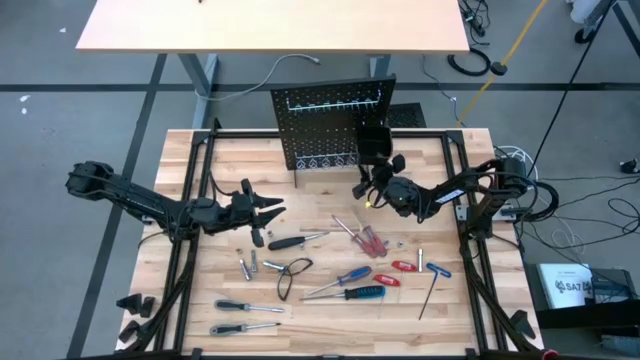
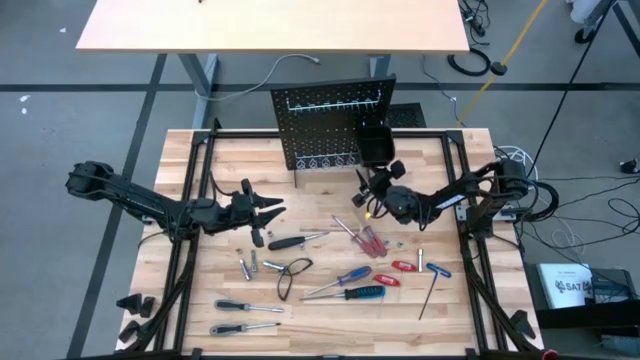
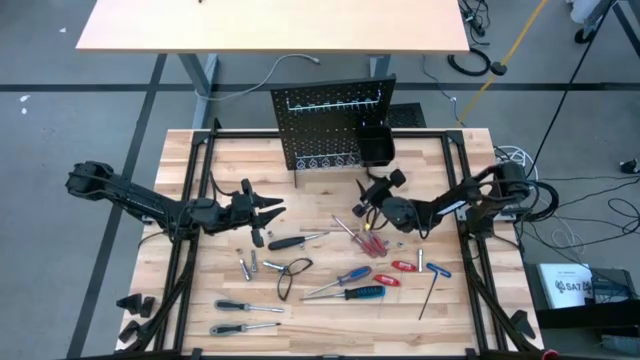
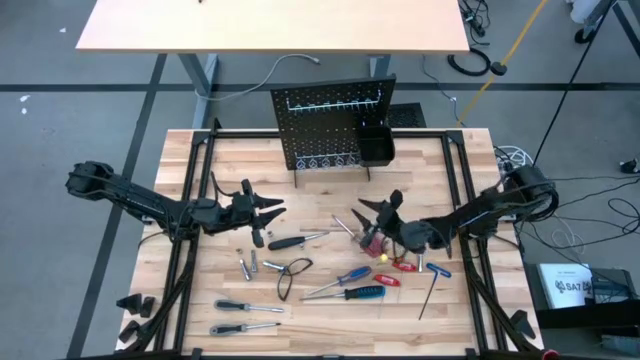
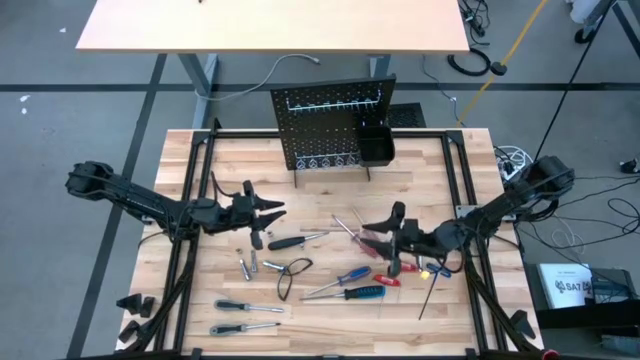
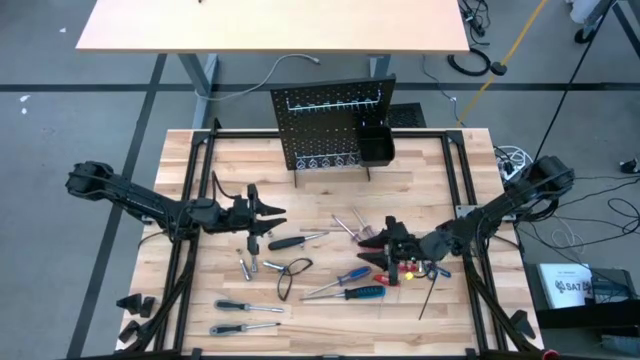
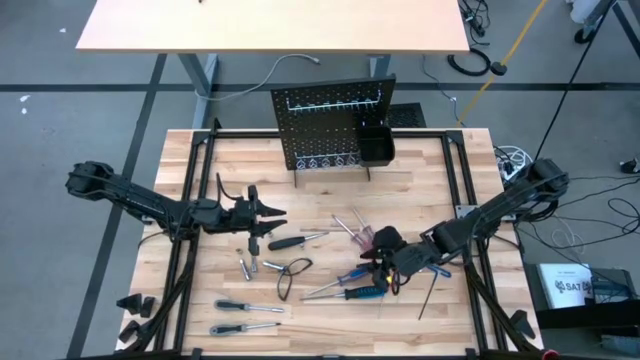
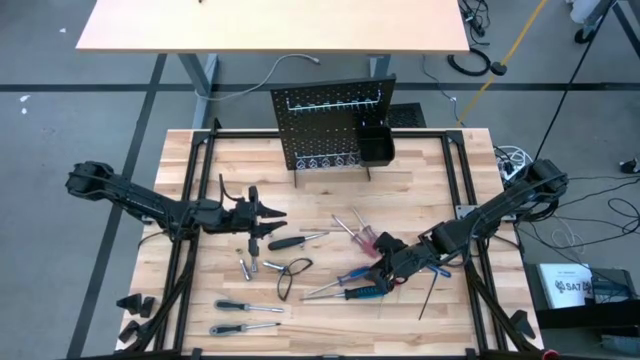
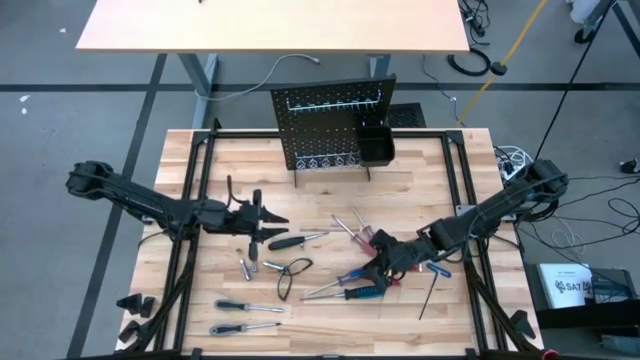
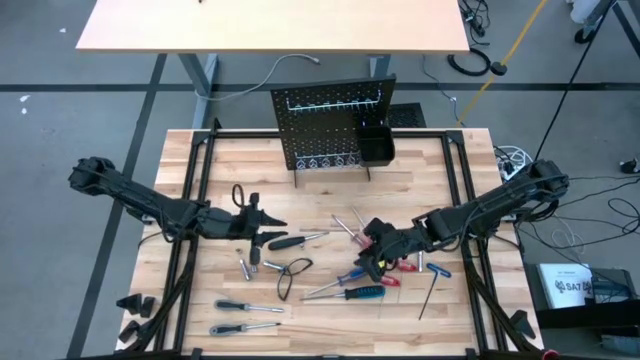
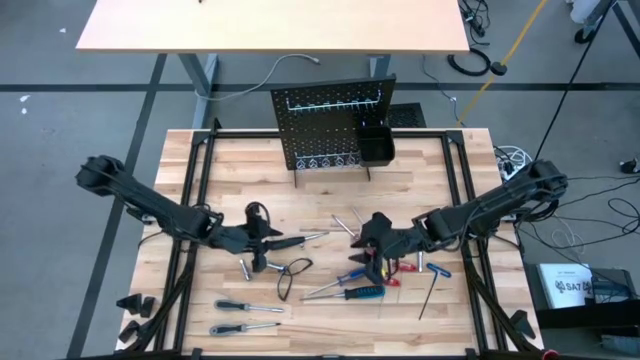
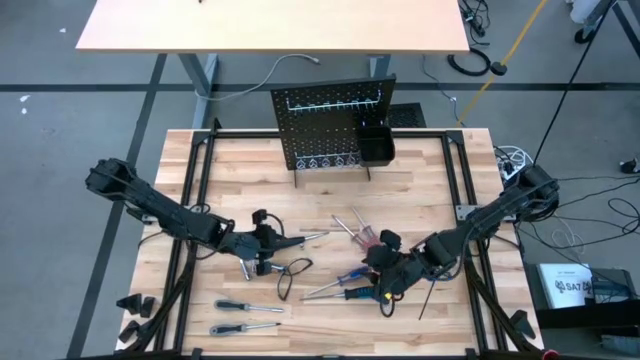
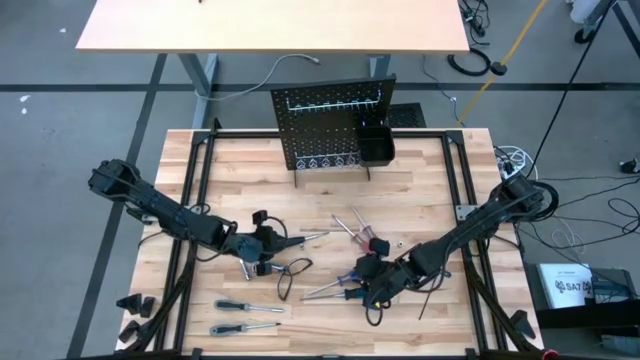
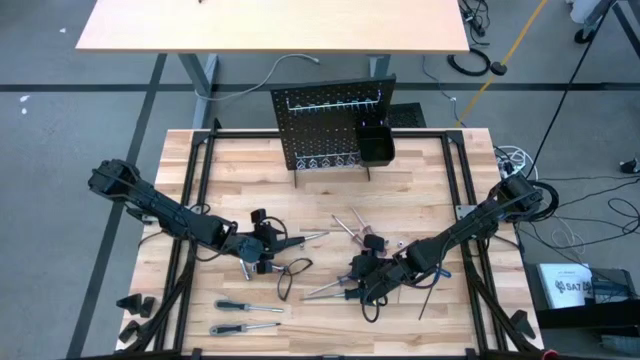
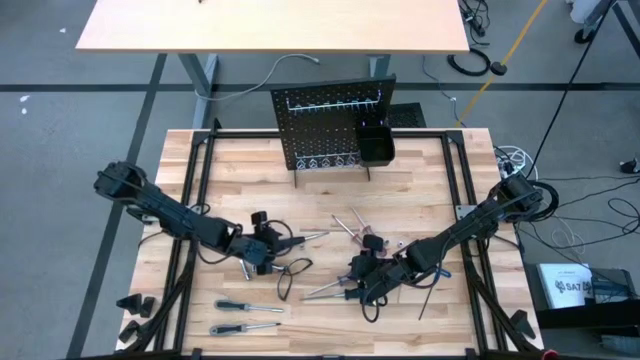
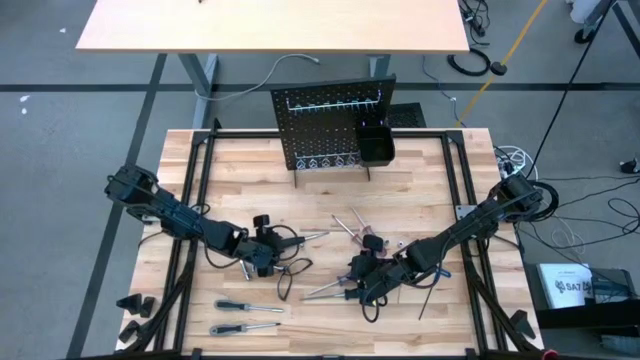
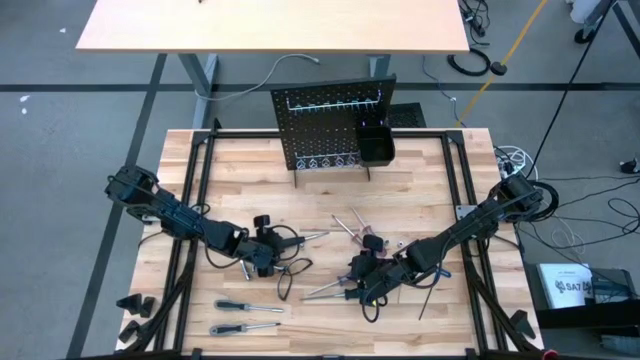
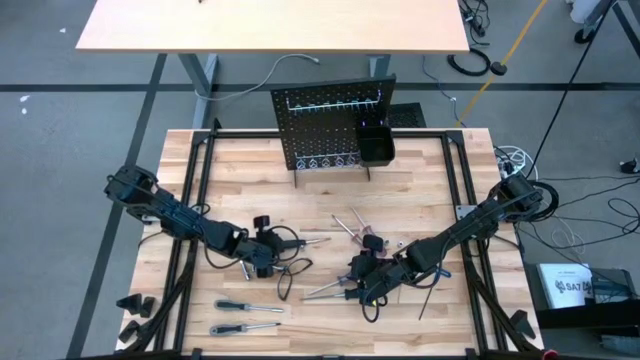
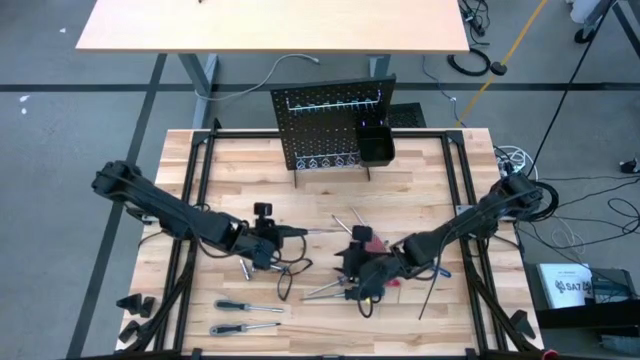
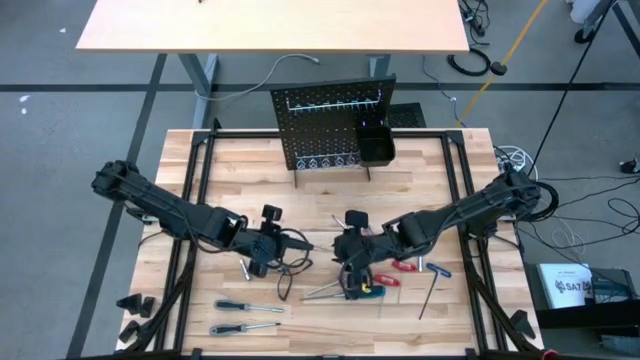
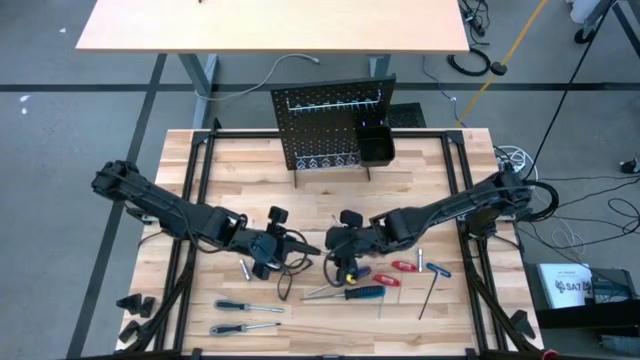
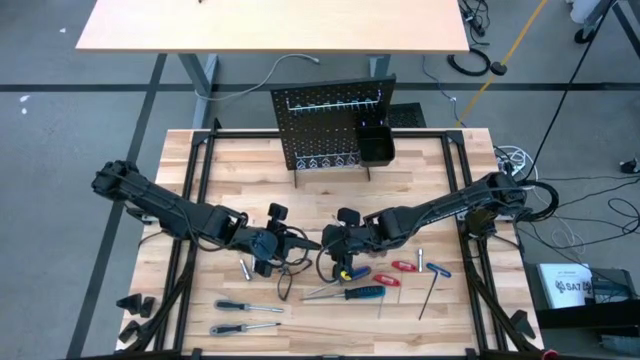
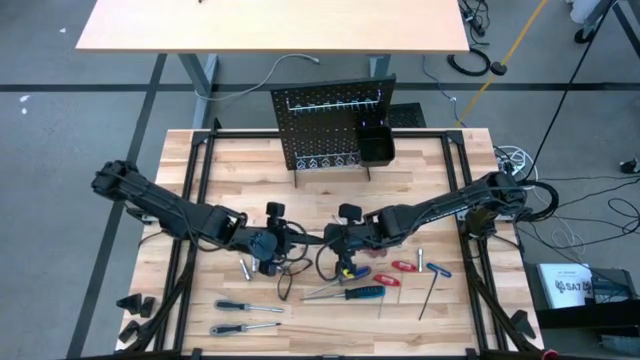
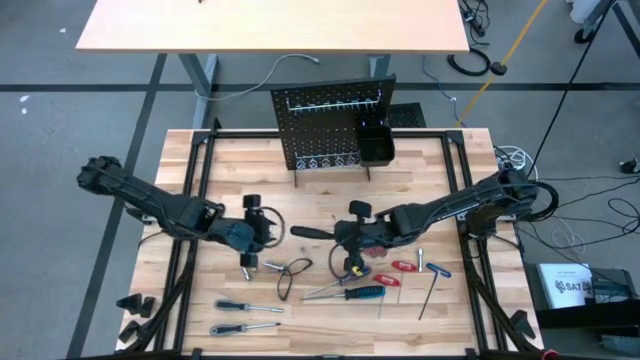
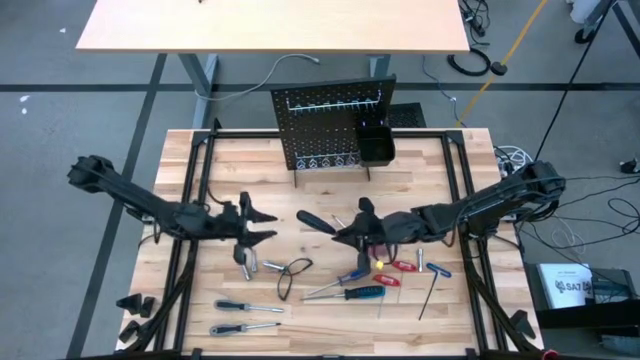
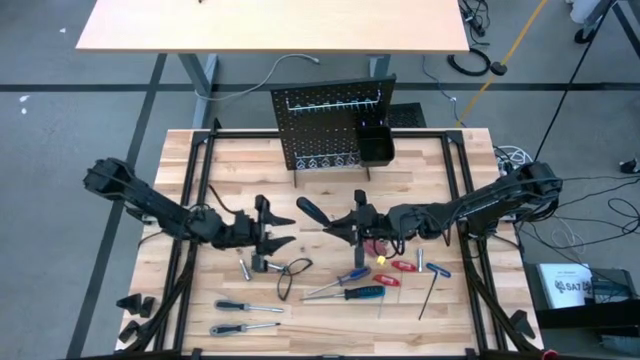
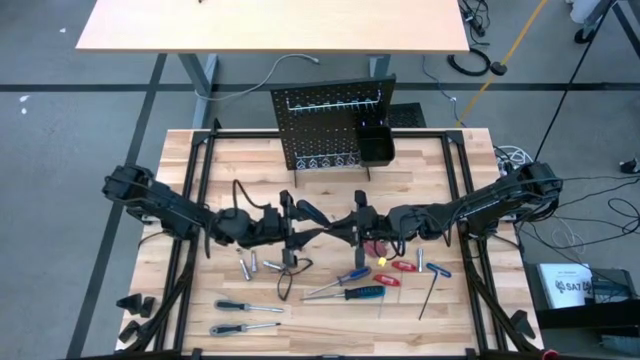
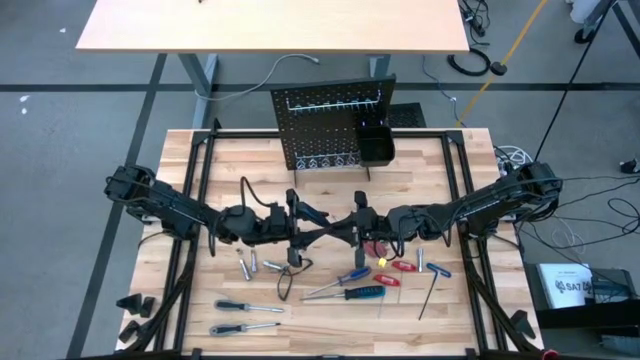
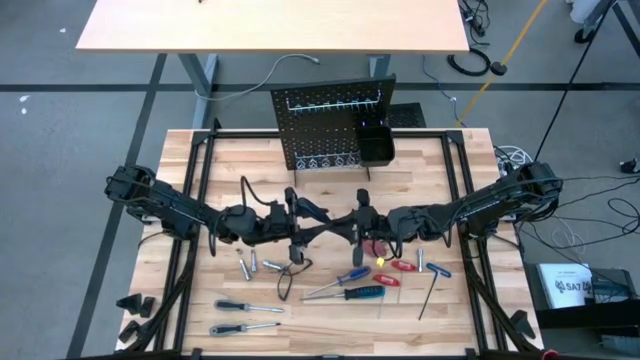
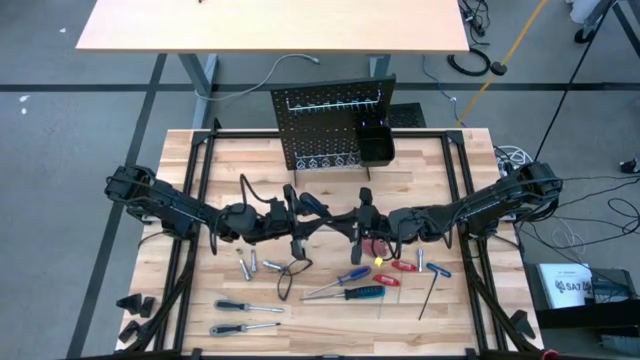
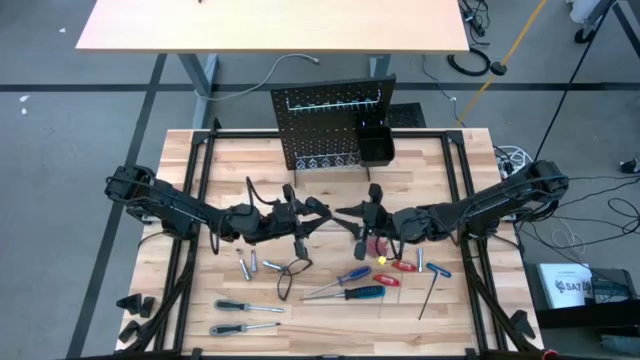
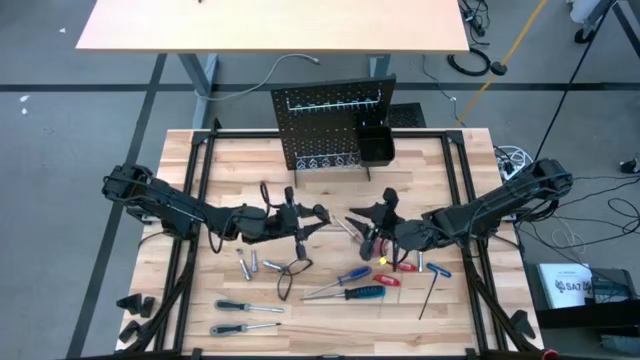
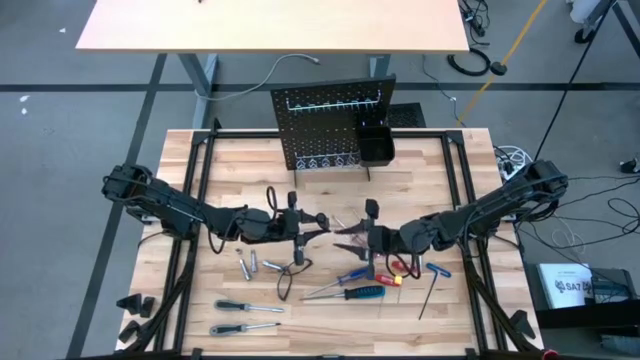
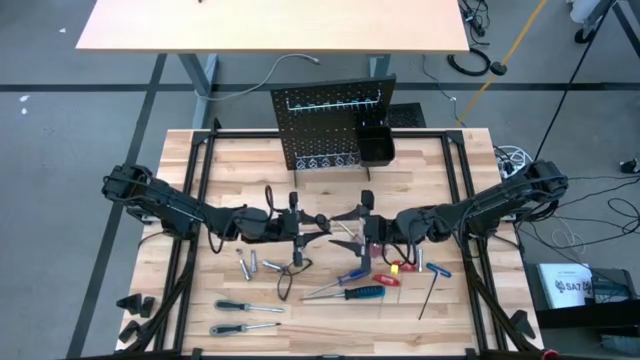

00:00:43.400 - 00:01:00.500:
Task: Hang tools onto peg board
Hang the black screwdriver on the peg board

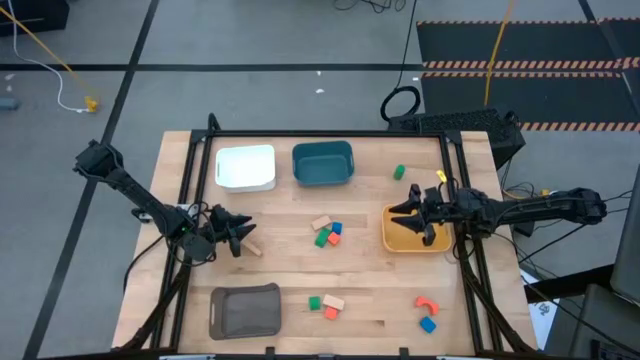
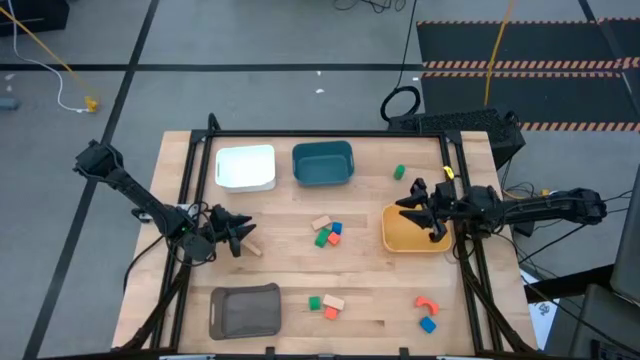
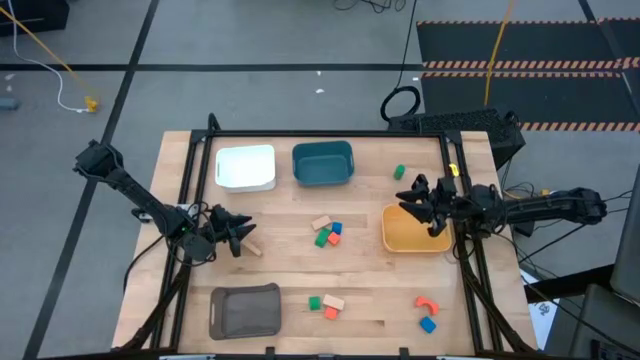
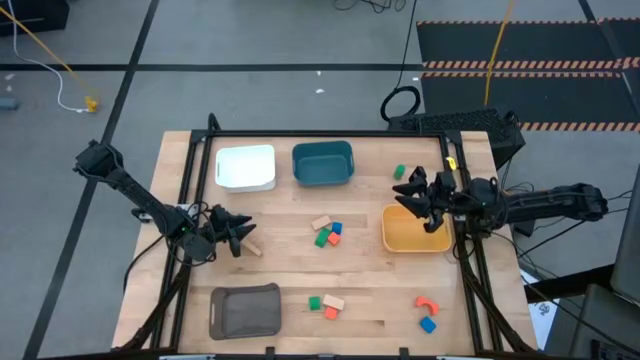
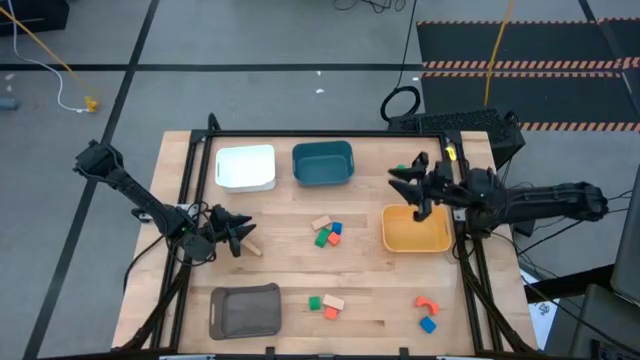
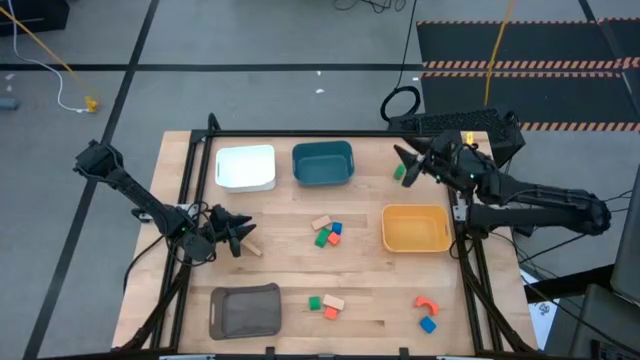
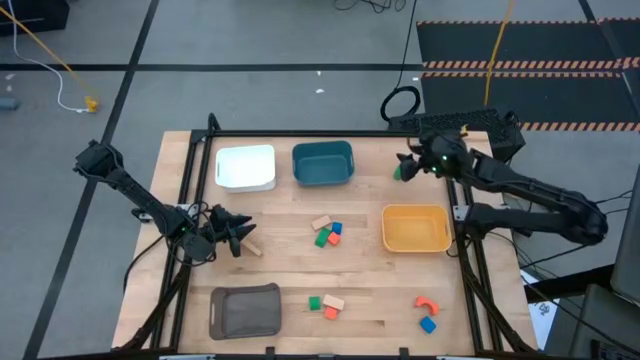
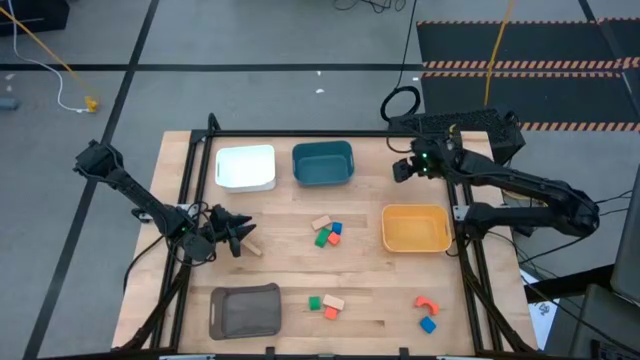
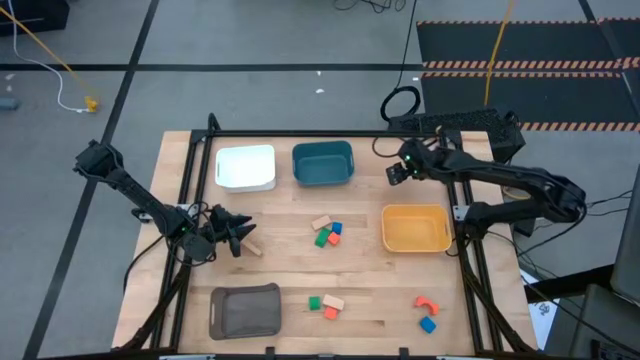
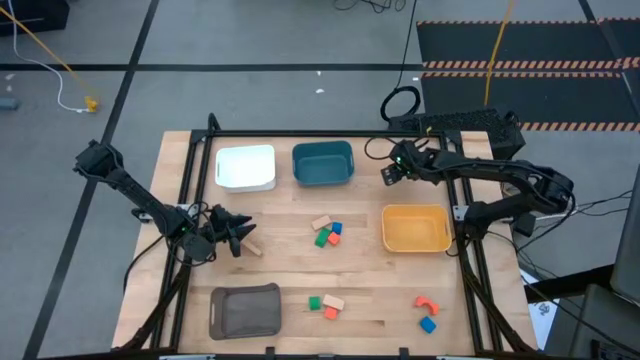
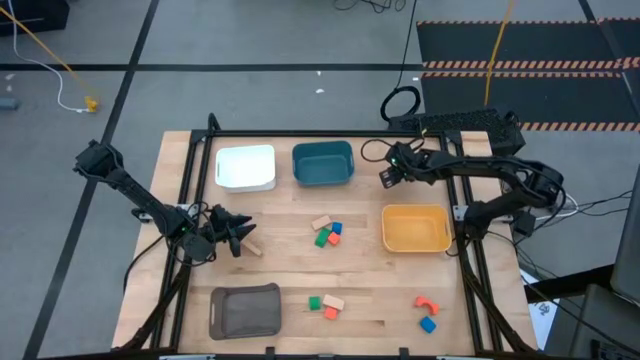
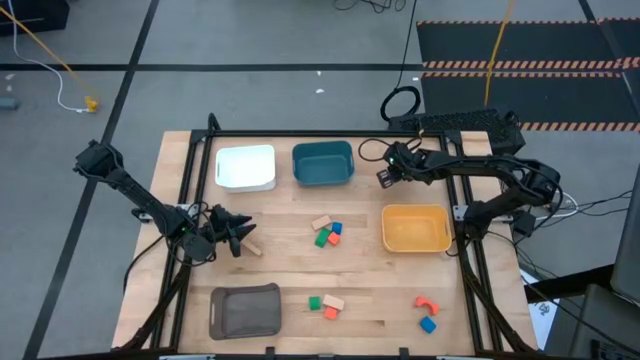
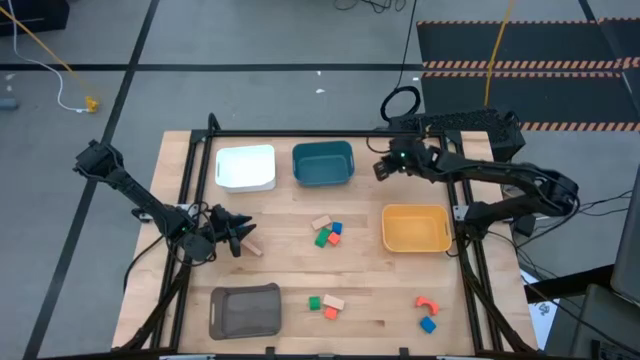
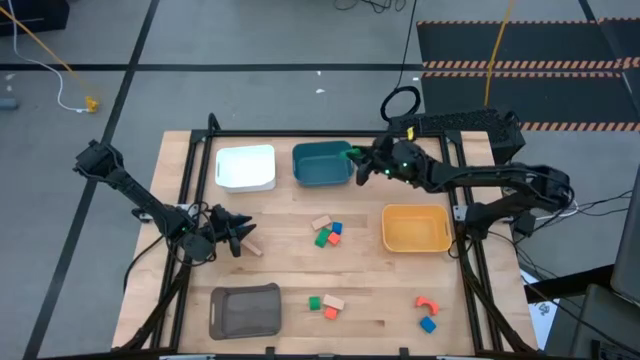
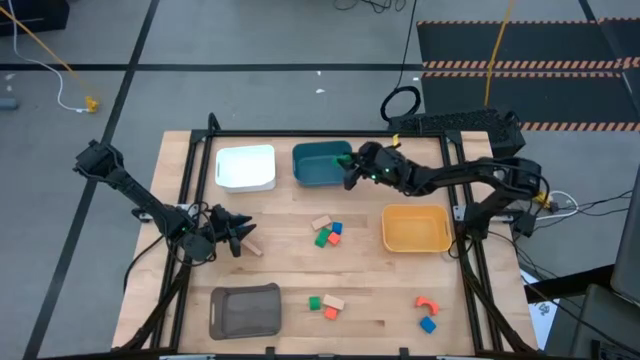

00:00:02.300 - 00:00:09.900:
Task: Sort & place blocks by color
Put the top green block into the blue bin
